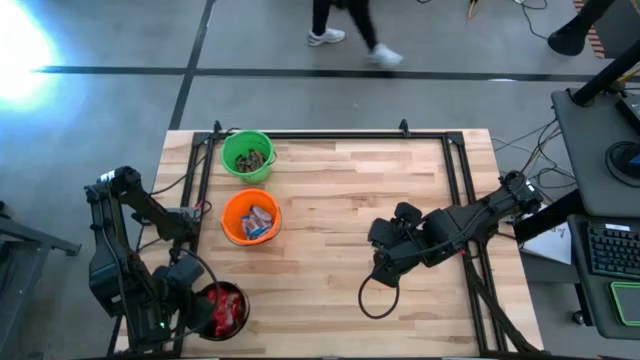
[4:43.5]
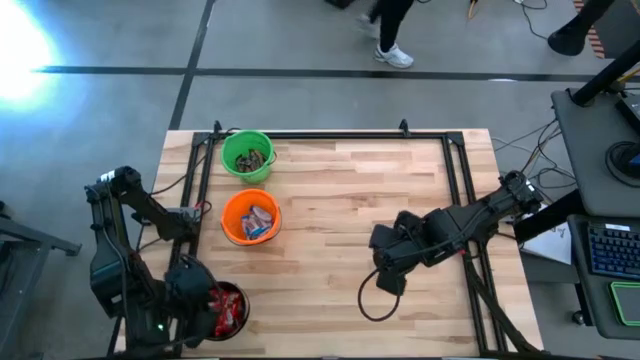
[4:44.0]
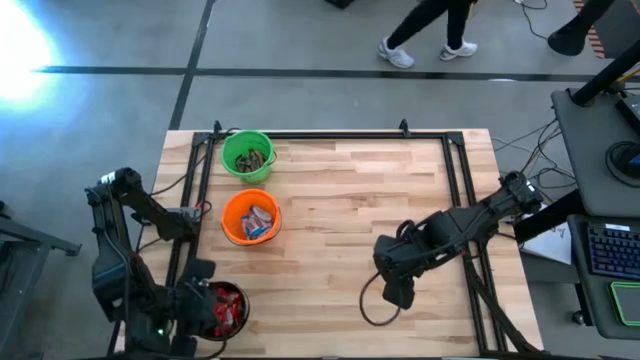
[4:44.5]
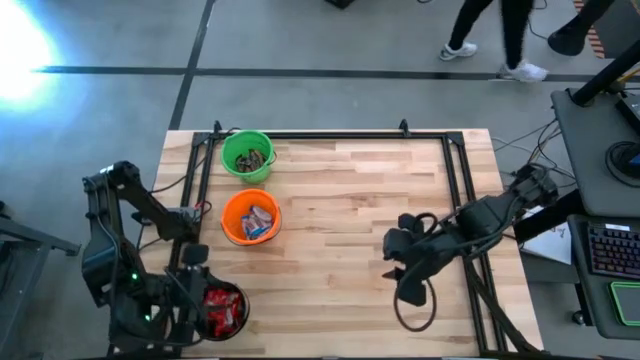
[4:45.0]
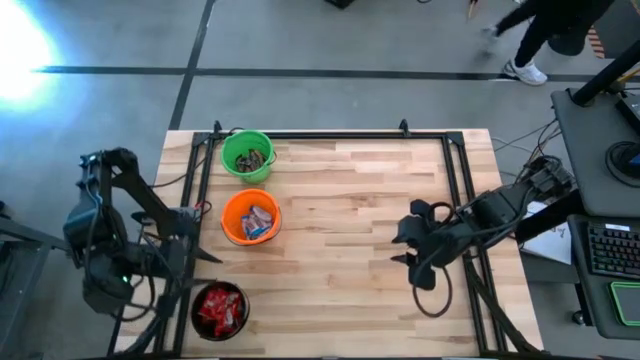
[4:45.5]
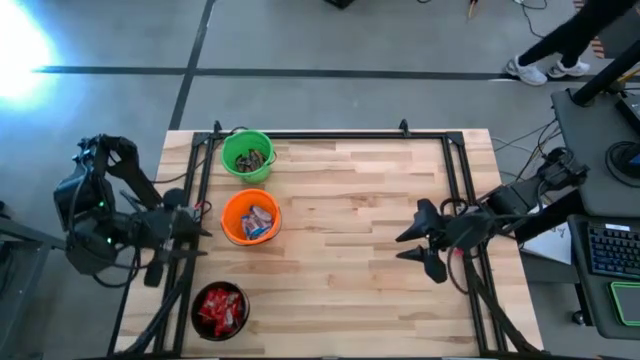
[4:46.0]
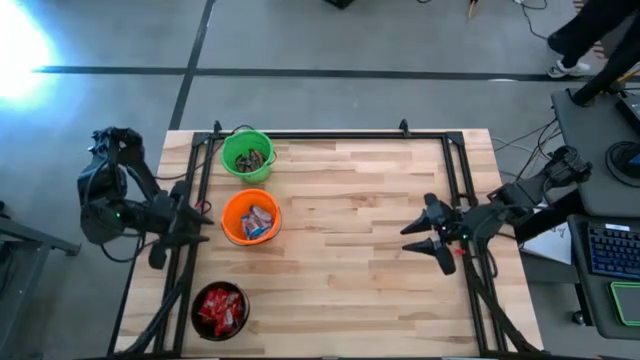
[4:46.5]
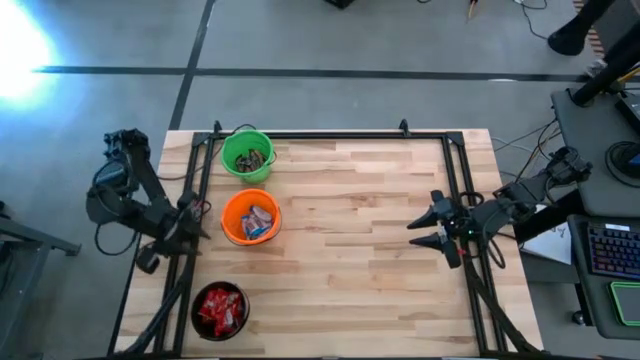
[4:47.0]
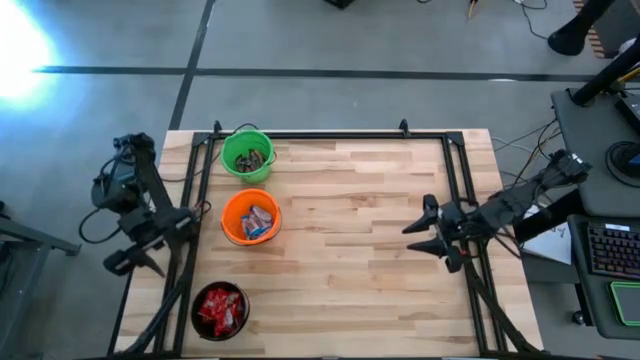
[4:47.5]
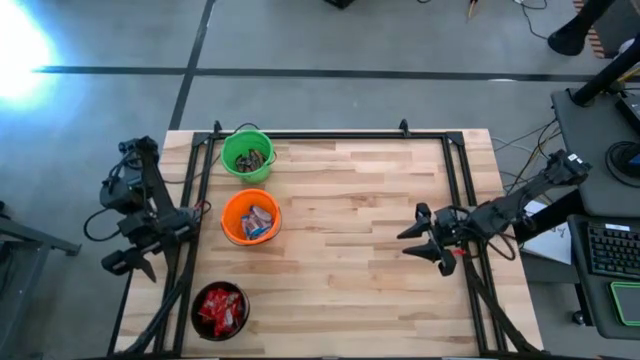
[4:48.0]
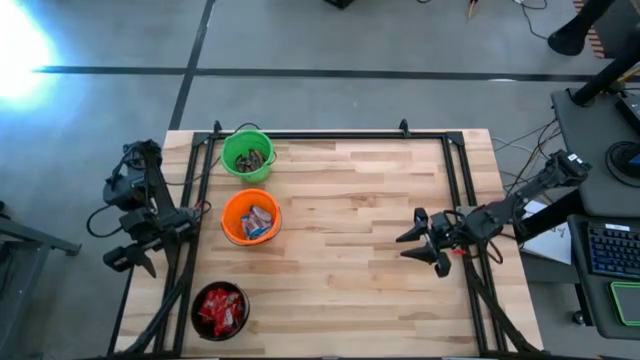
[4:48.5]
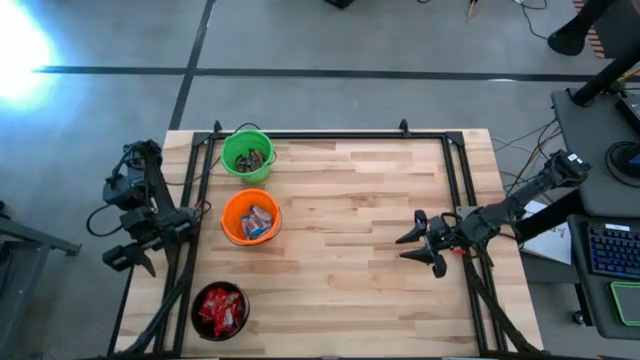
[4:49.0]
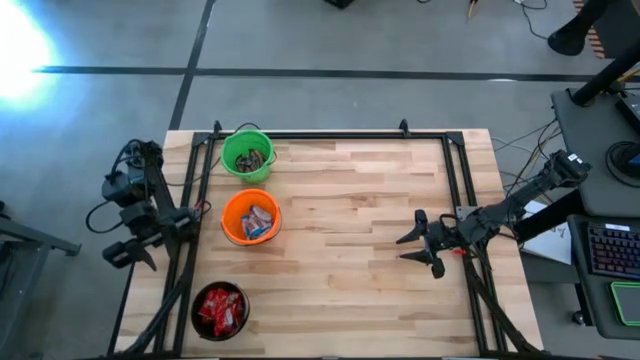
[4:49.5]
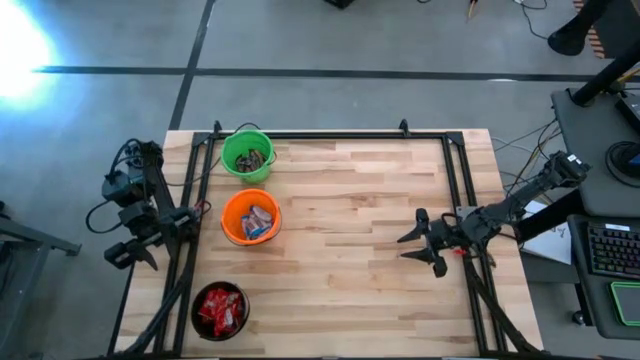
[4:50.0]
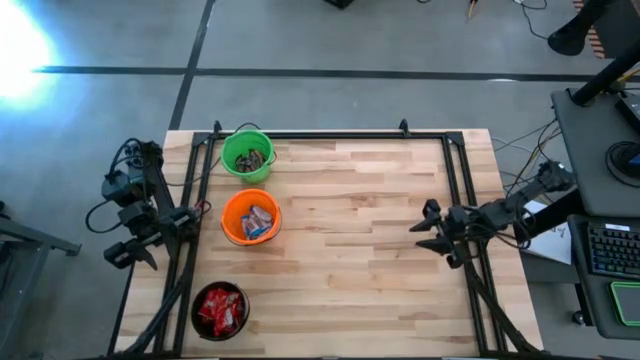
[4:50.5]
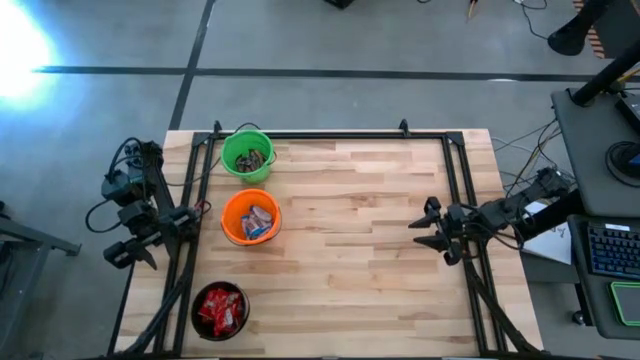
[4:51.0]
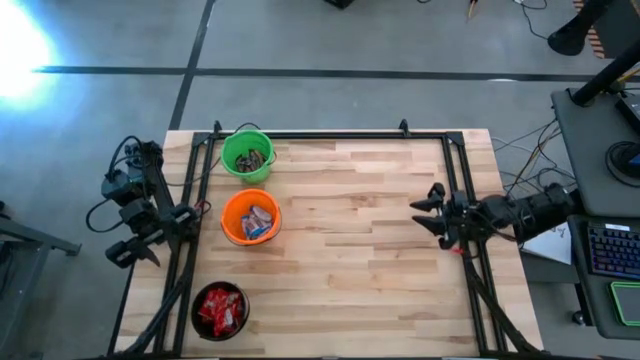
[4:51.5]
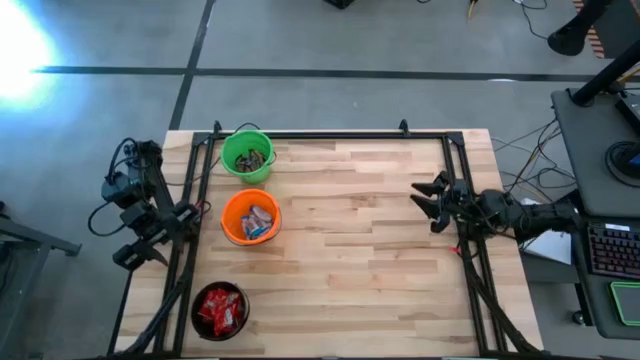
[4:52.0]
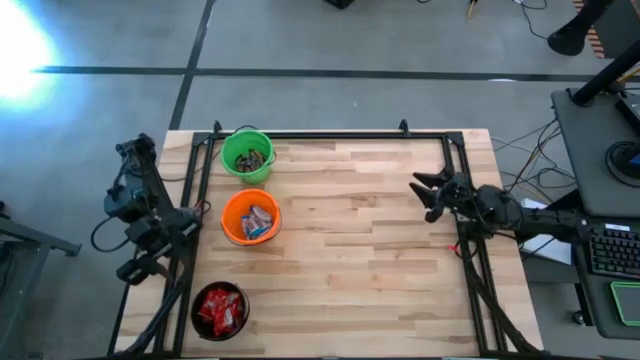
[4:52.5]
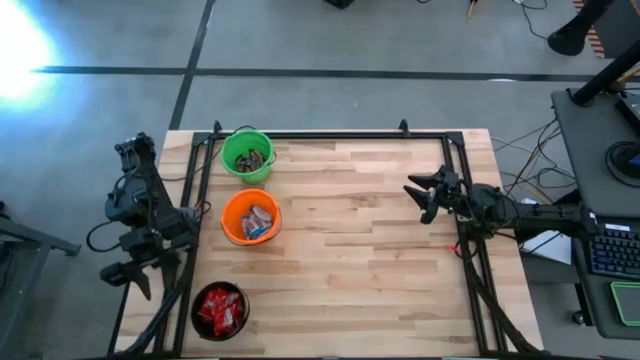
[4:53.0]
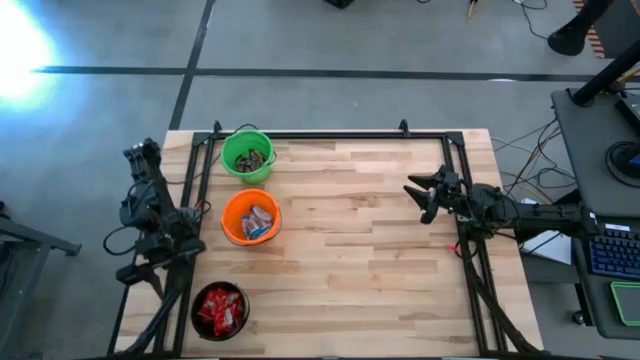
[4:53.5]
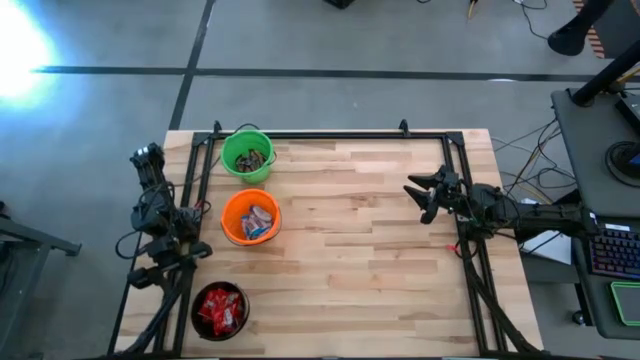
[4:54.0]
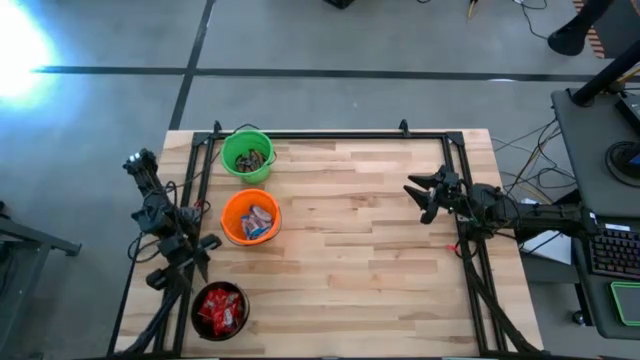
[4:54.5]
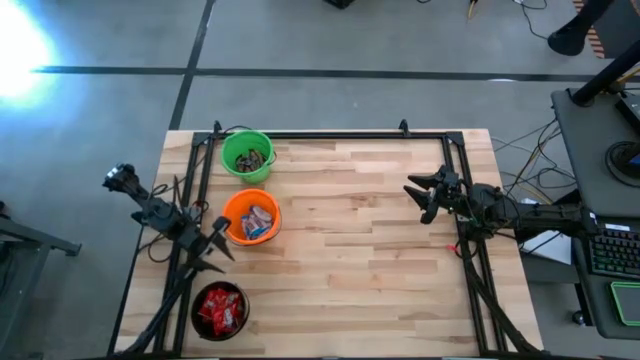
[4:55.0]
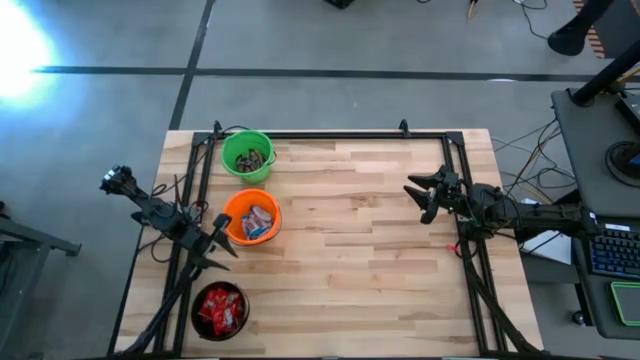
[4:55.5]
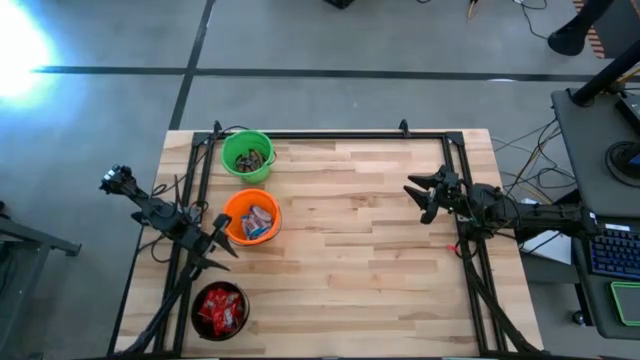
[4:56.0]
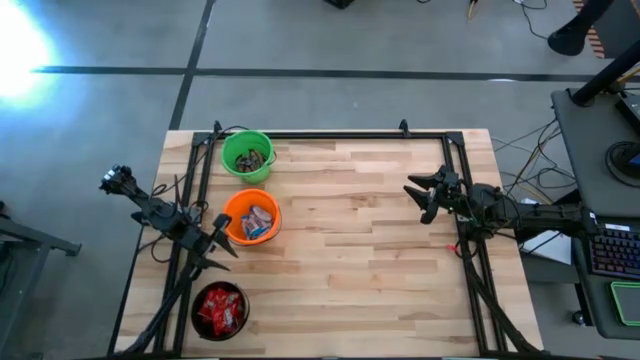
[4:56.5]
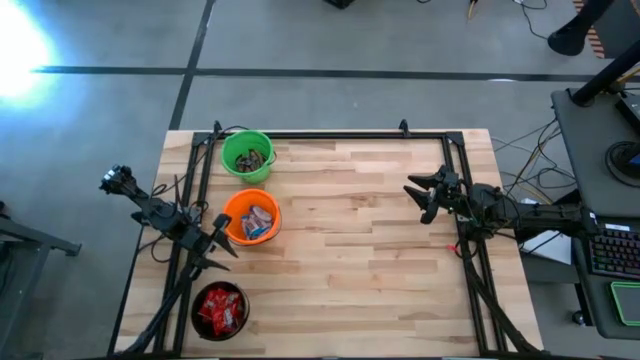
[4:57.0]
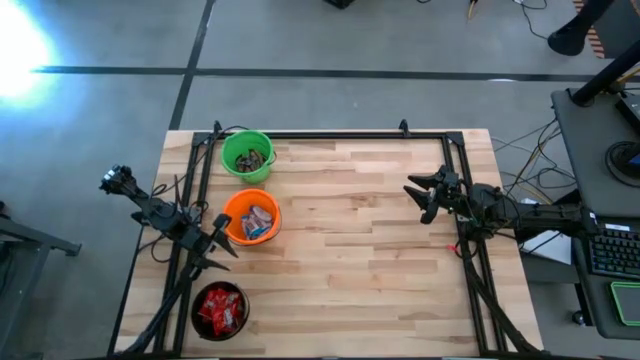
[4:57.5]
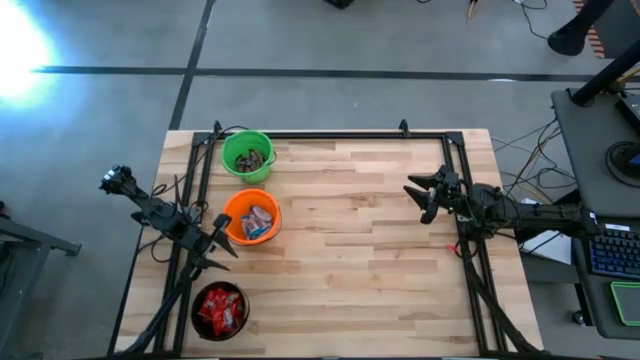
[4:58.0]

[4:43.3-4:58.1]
Task: Organize candy in baskets
Return to Home Position

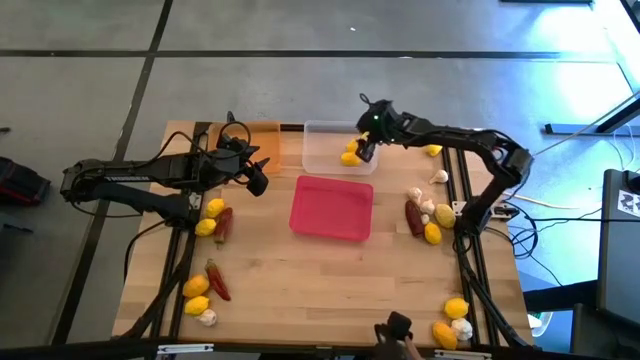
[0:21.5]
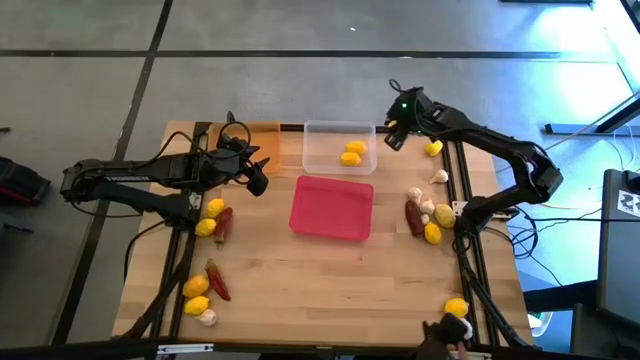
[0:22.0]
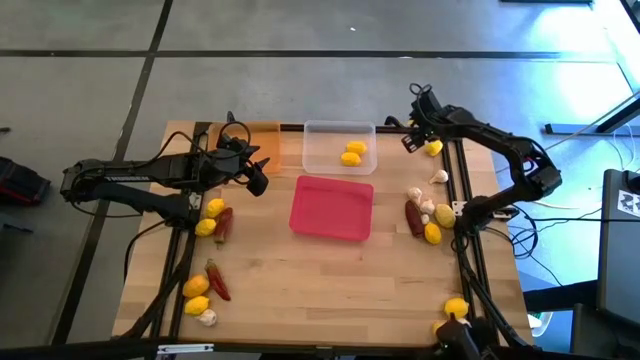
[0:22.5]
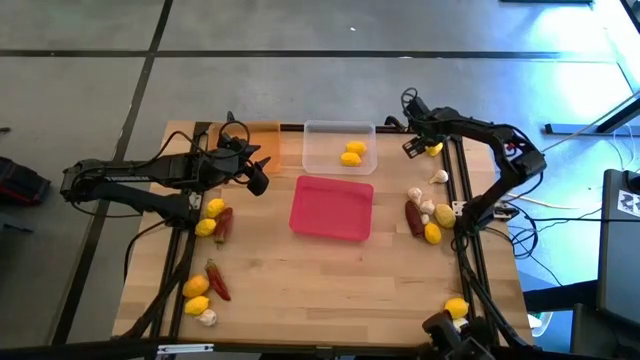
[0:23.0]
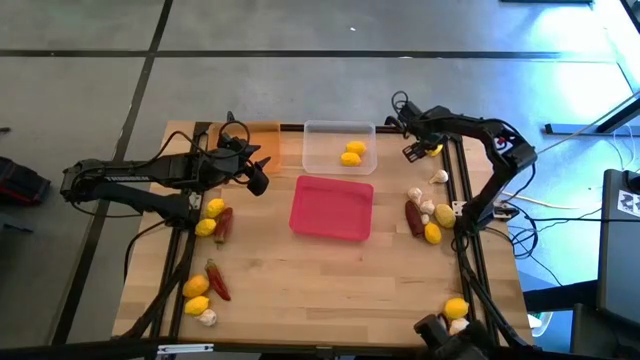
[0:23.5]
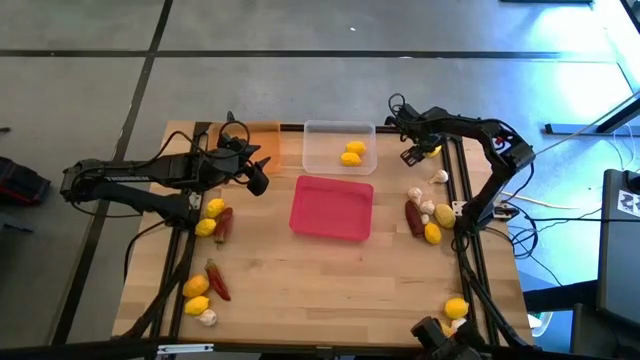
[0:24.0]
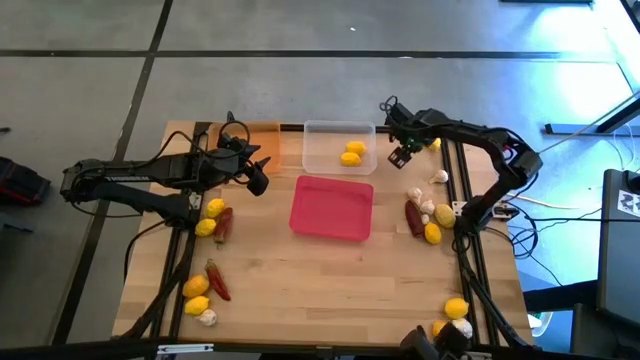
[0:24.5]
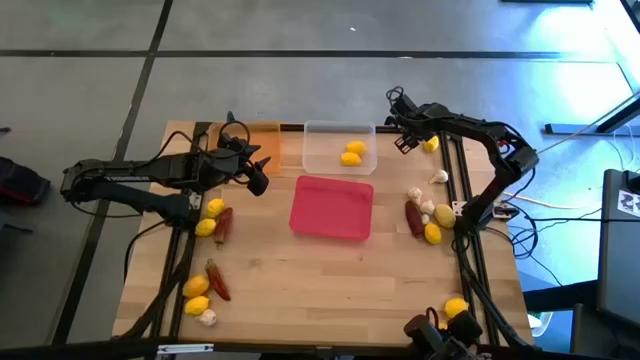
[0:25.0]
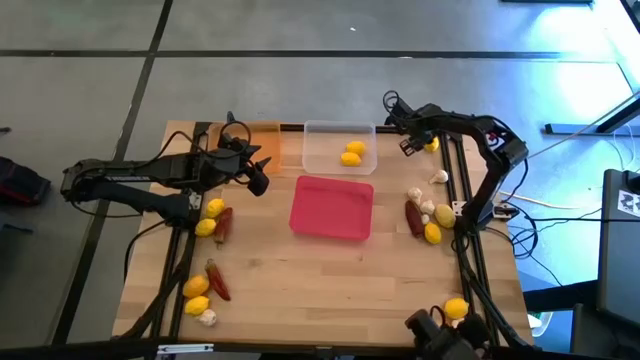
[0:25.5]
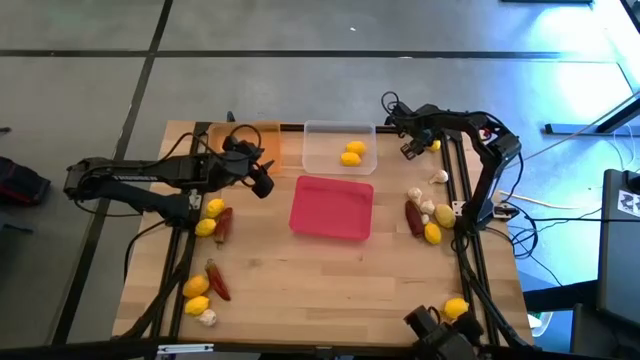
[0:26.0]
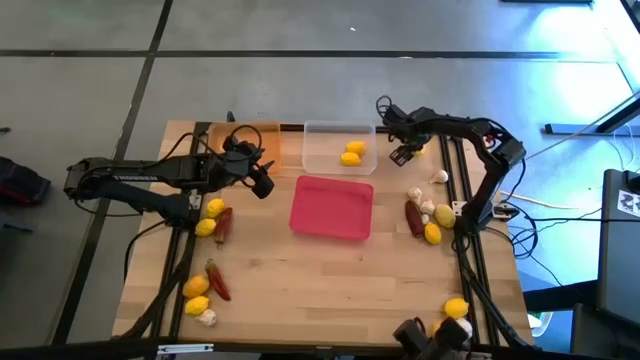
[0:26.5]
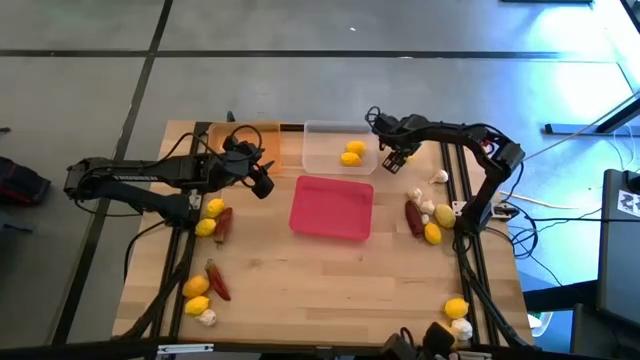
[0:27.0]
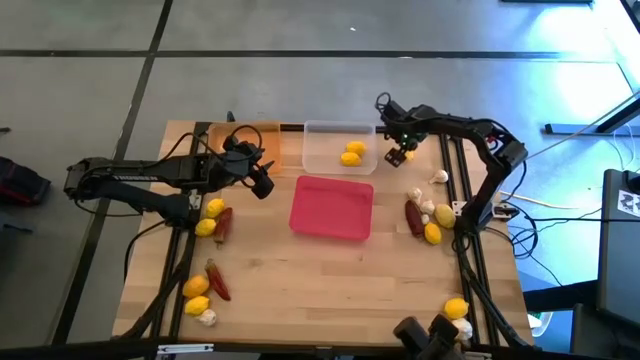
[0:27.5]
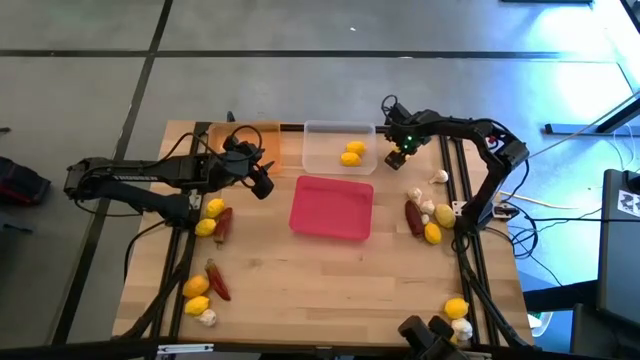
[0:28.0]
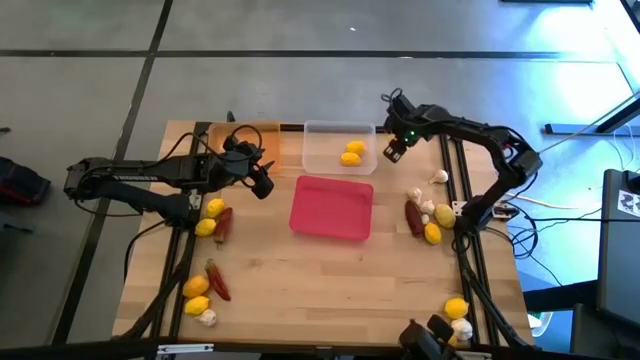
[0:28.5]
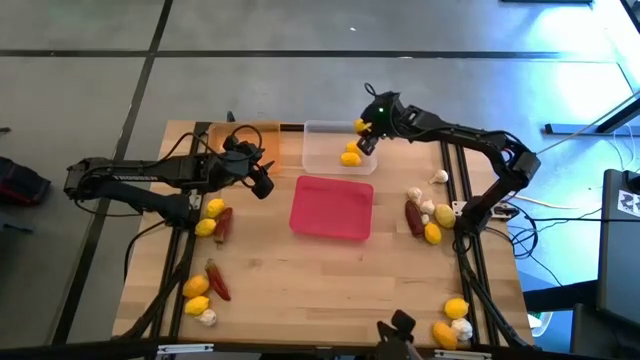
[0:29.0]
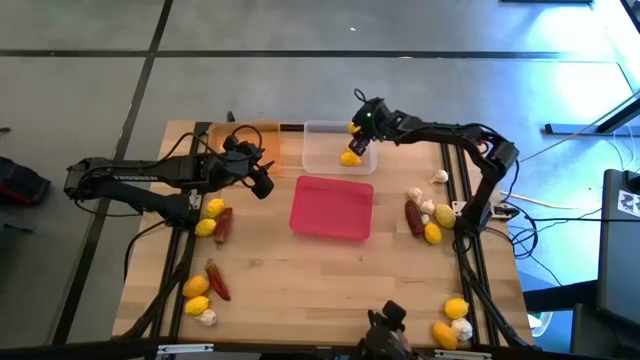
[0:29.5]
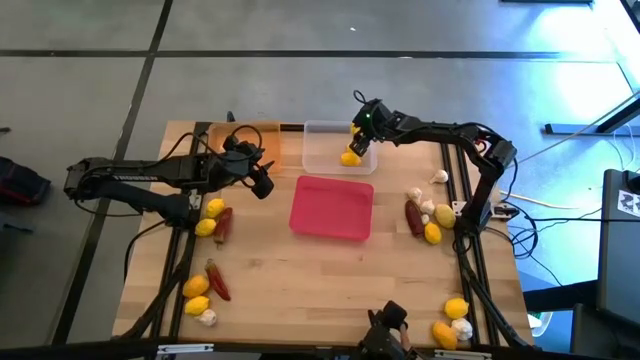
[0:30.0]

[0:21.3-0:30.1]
Task: Sort produce into baskets
Put the yellow lemon in the transparent bin
